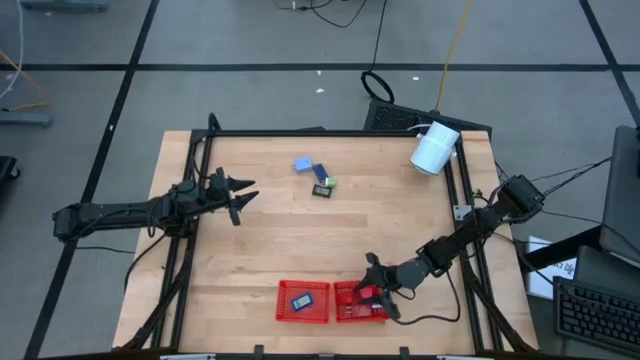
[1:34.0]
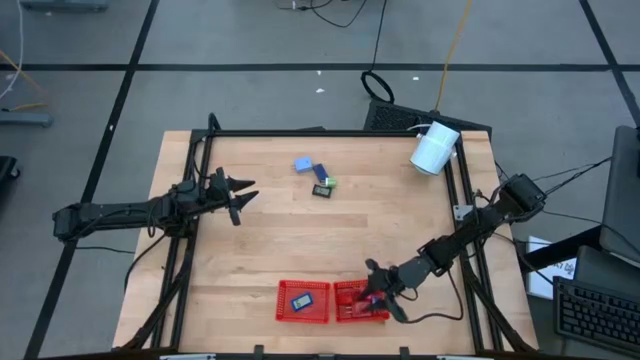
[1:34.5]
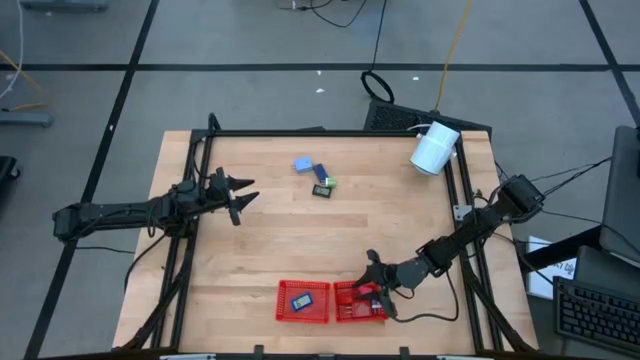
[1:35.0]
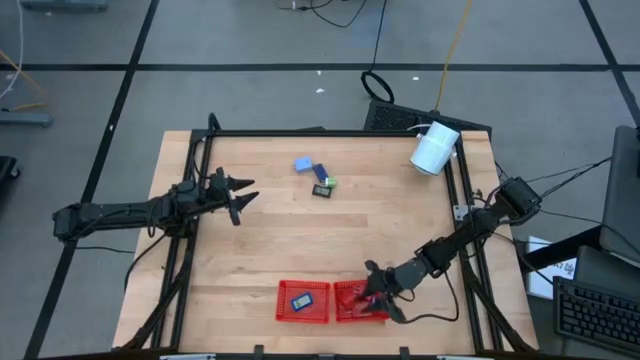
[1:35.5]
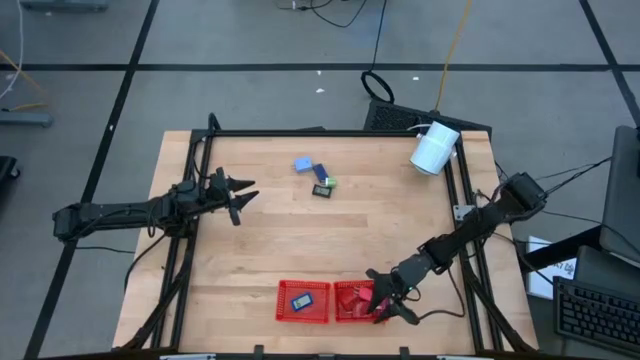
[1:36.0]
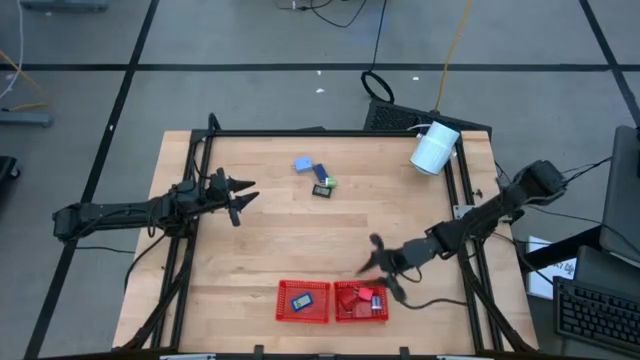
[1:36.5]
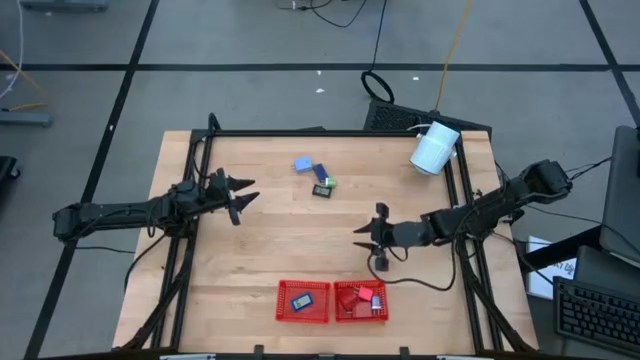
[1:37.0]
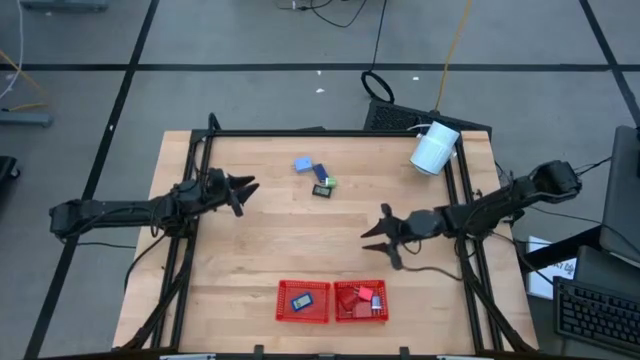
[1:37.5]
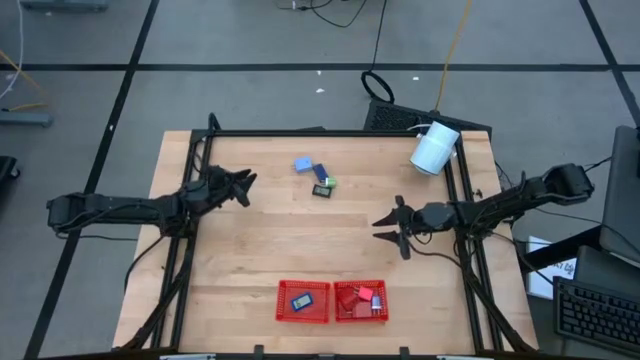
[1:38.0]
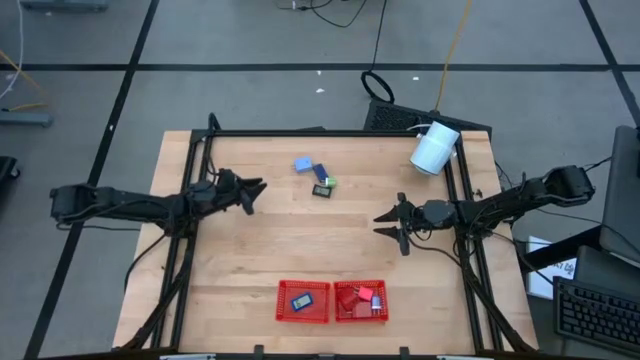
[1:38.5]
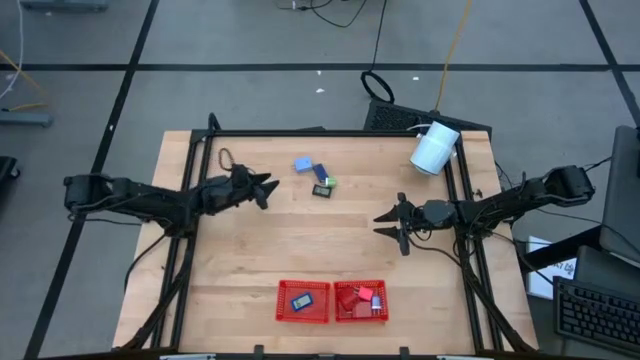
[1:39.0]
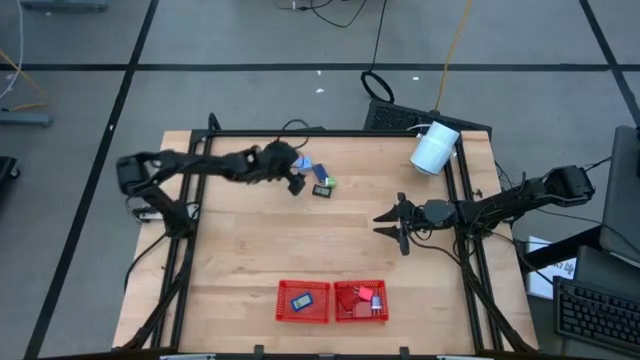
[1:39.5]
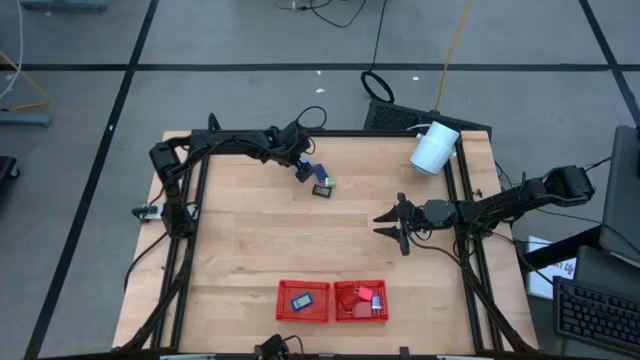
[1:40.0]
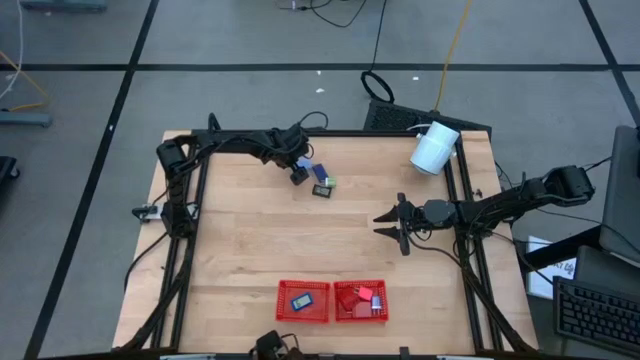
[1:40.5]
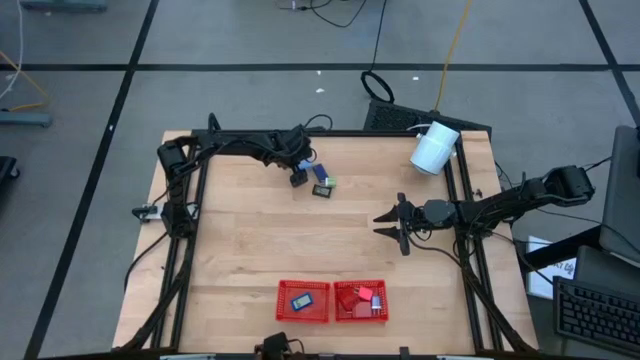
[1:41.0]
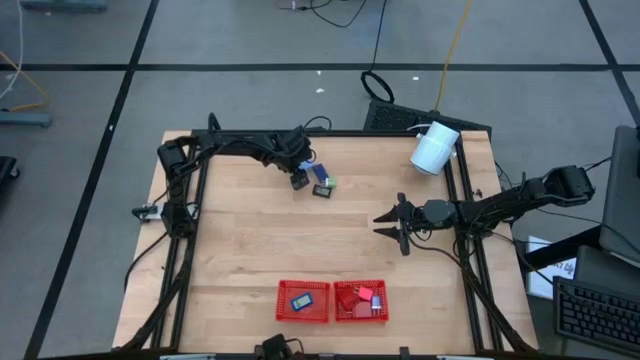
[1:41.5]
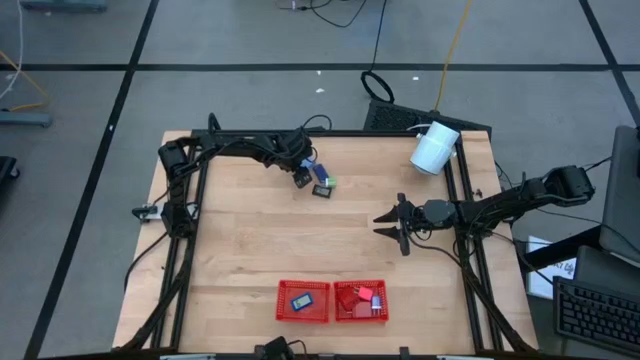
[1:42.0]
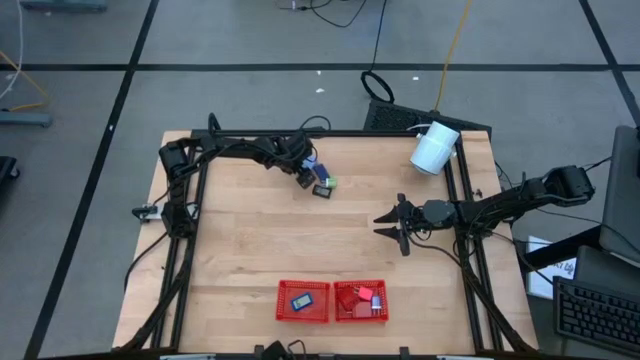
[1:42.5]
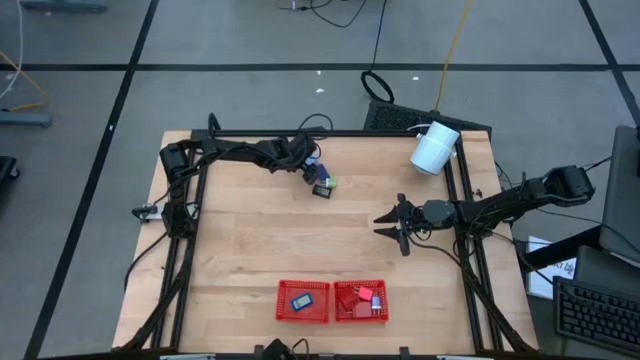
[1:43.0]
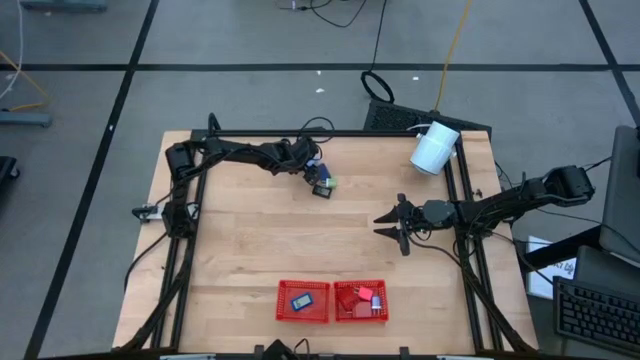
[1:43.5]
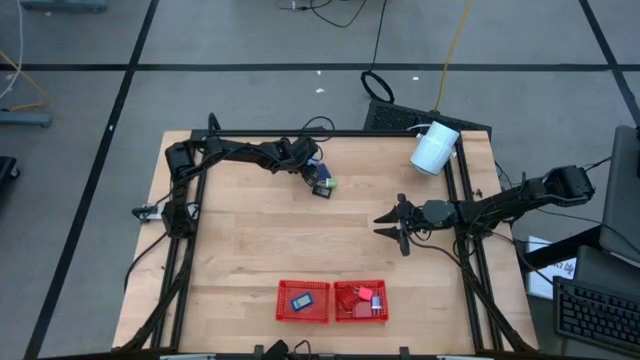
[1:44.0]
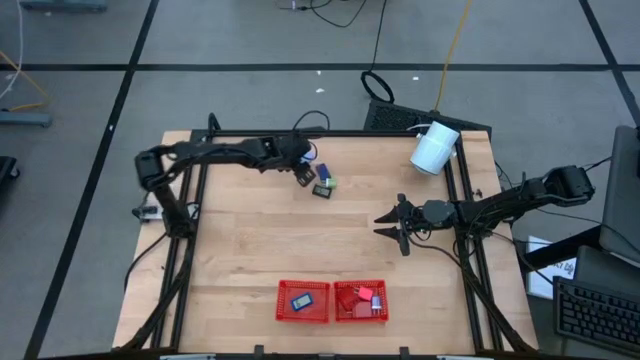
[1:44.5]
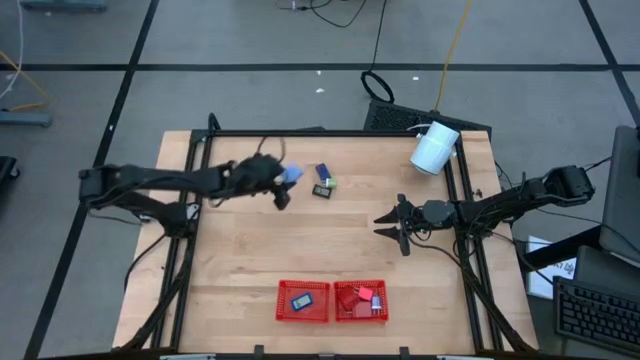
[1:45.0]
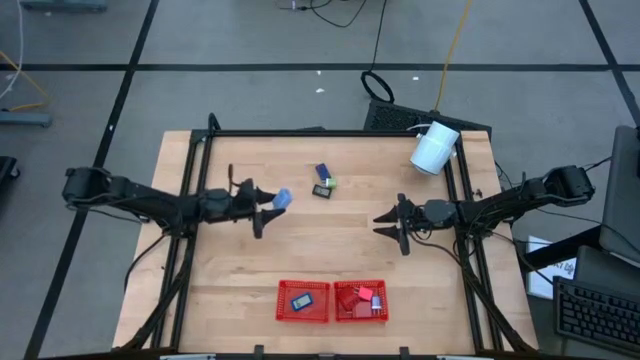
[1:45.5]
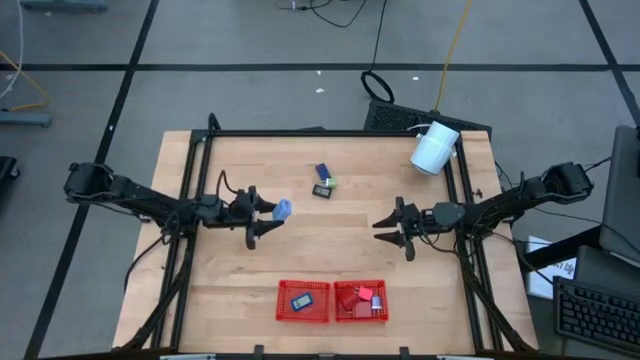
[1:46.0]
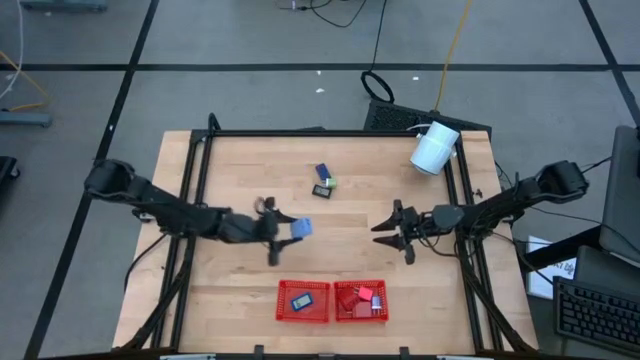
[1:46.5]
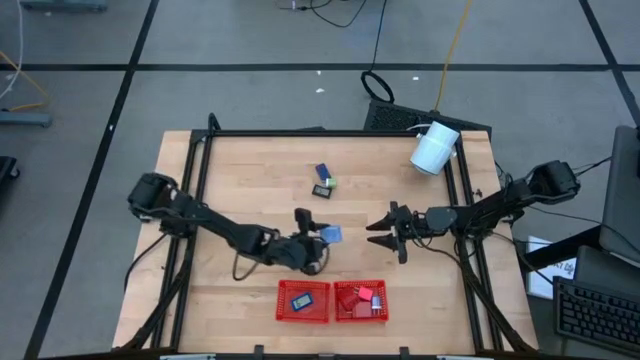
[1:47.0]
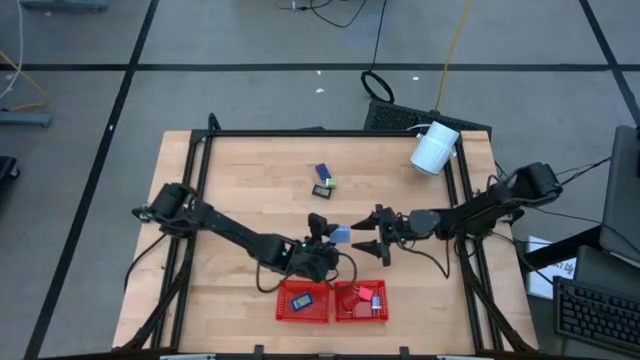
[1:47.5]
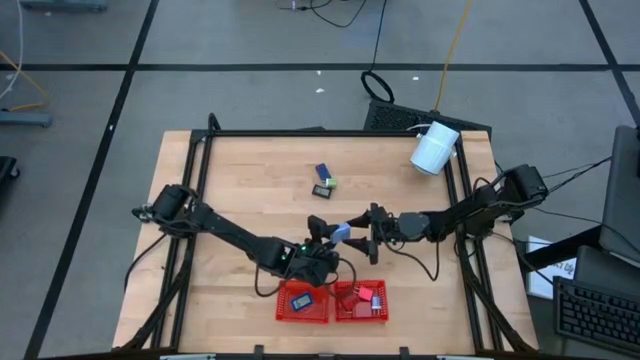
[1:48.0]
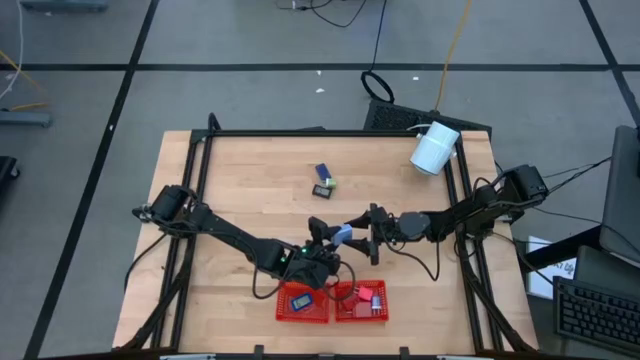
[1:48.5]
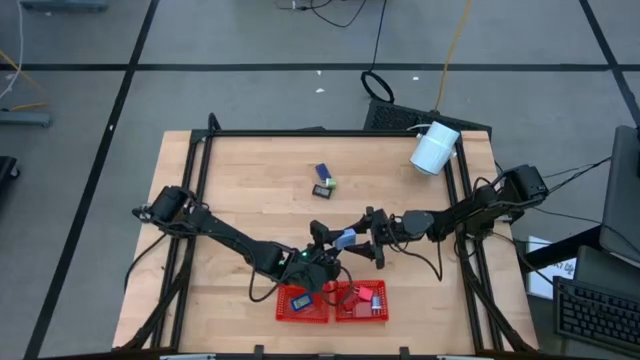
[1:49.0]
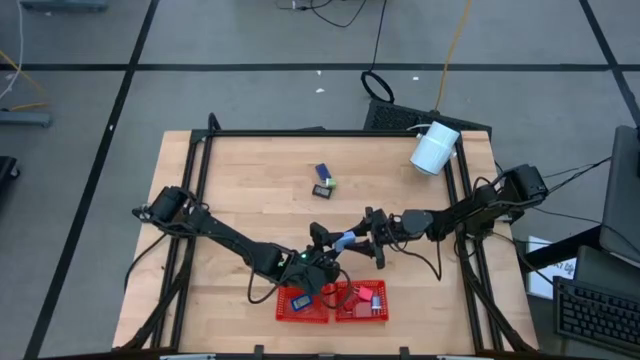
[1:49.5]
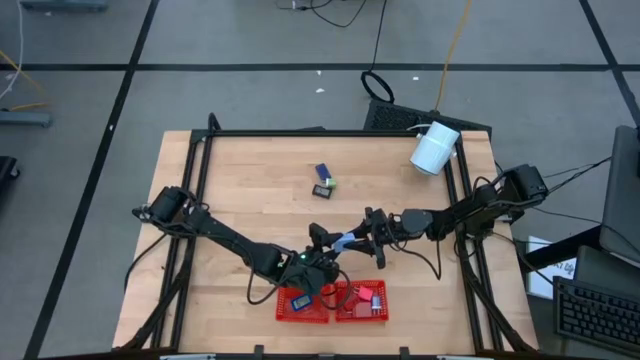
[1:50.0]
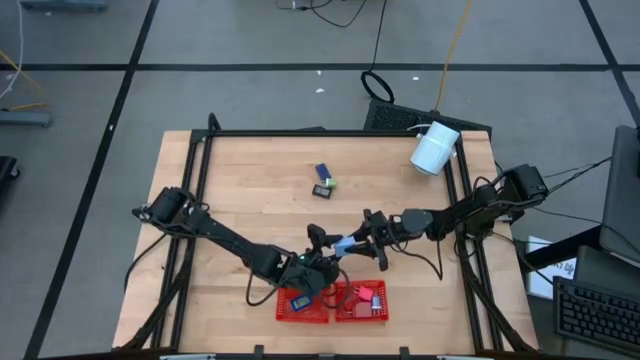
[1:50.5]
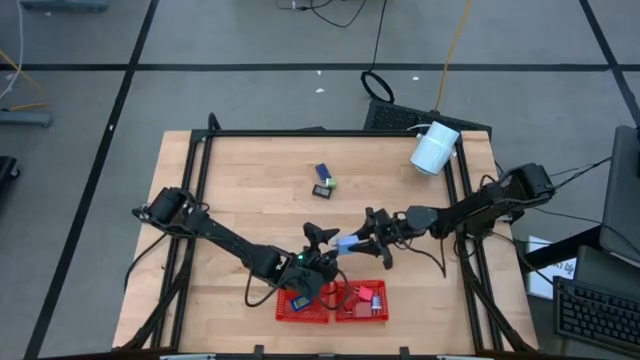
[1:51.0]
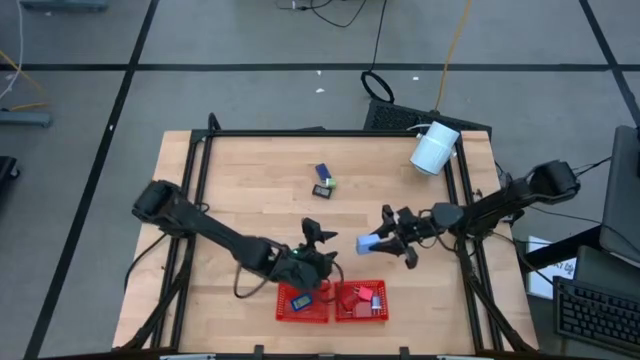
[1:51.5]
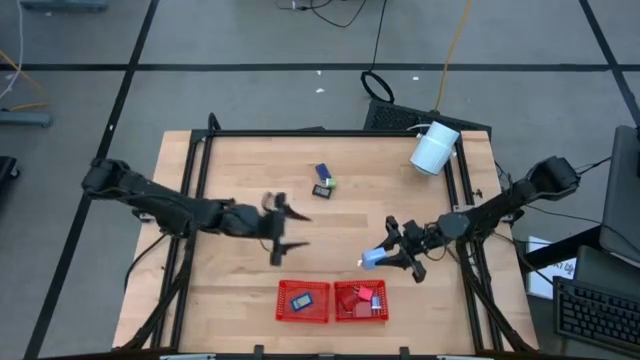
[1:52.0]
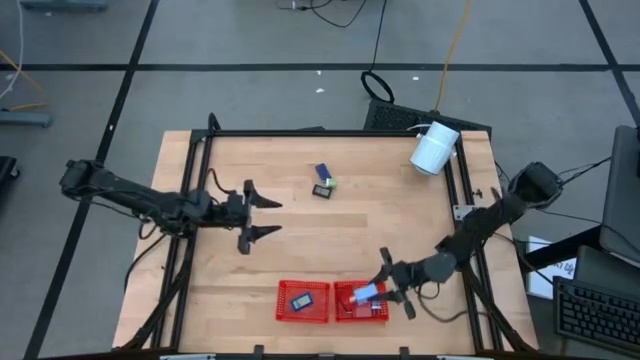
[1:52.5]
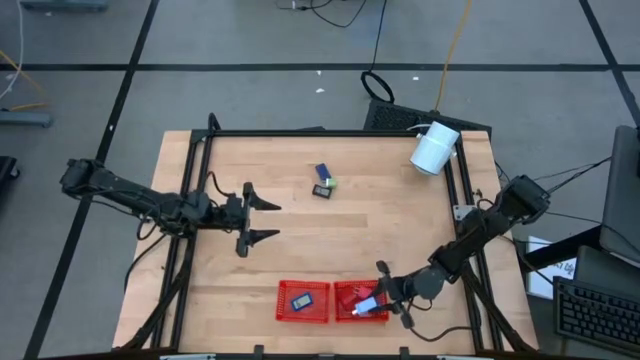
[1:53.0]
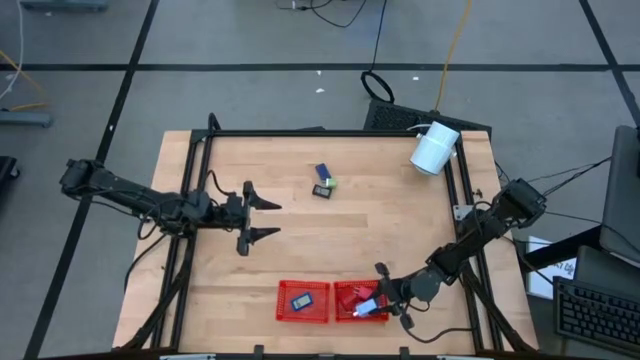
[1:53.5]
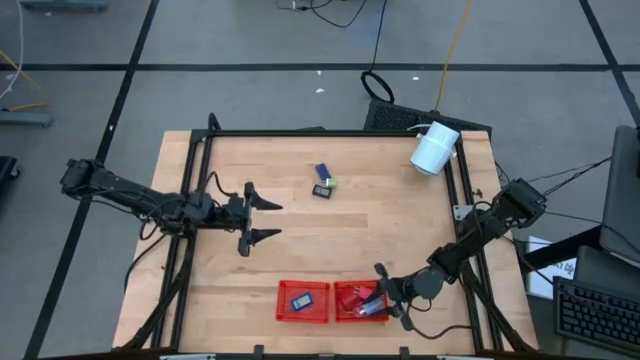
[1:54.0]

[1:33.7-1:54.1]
Task: Pick & Place Office items
Put the light blue charger adapter into the right red bin

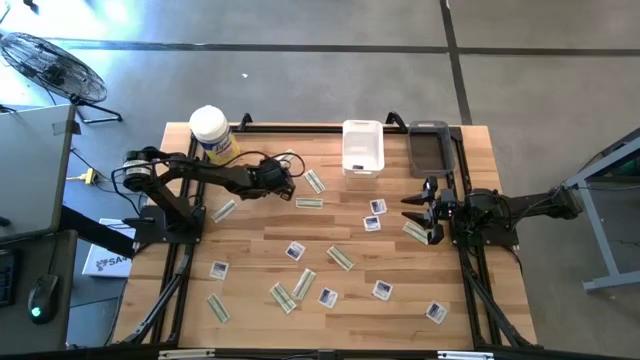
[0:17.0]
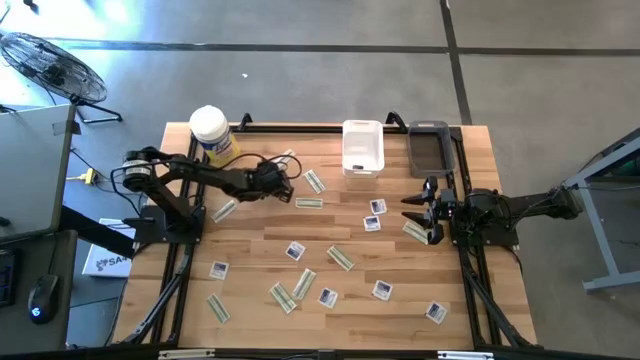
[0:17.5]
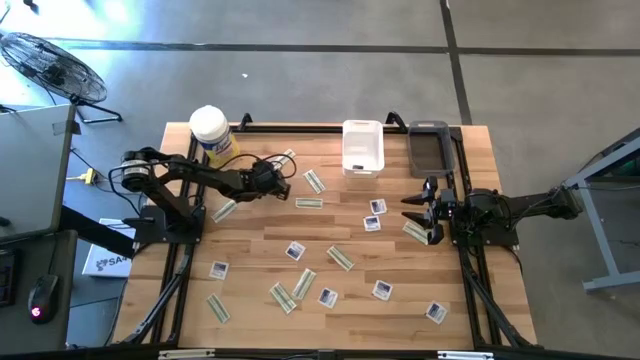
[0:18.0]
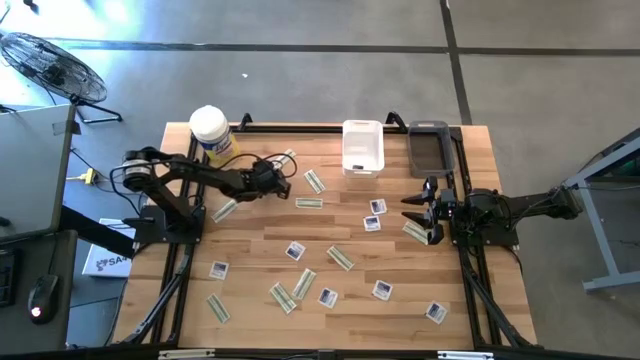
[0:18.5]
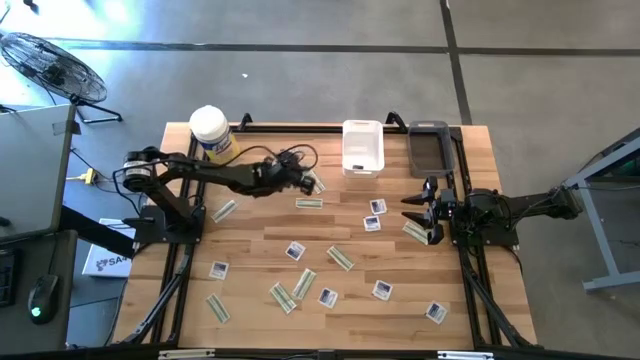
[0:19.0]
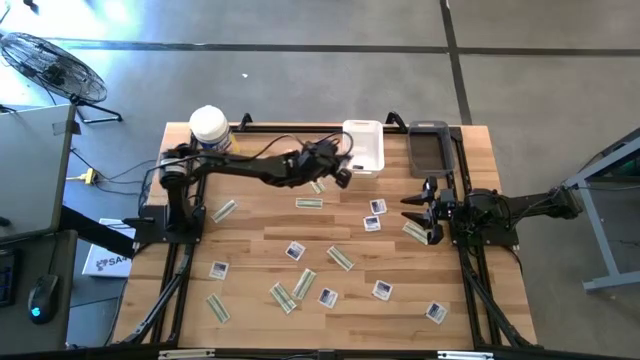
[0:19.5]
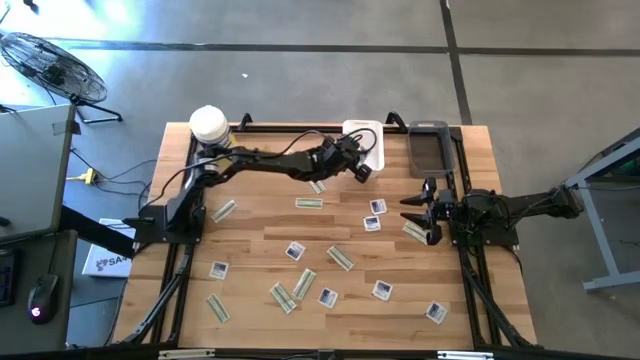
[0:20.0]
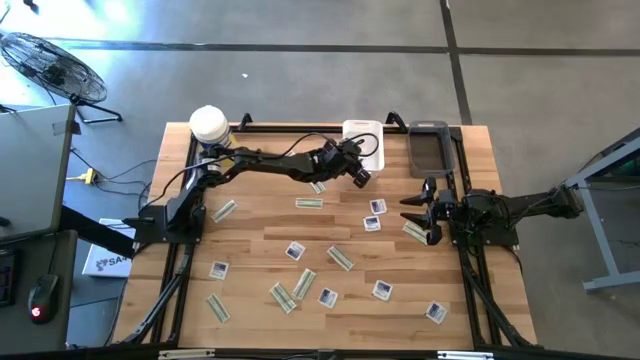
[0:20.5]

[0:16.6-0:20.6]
Task: Pick & Place First Aid Supplies
Put the blue alcohol pad into the white bin
